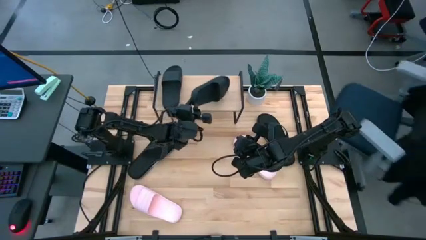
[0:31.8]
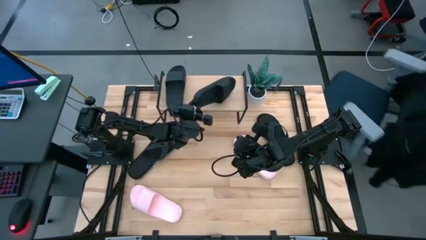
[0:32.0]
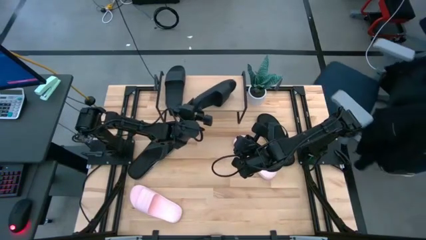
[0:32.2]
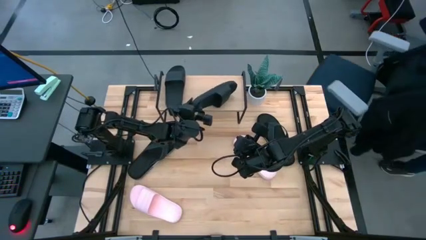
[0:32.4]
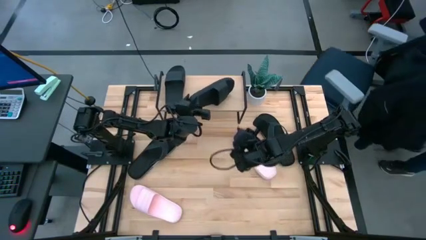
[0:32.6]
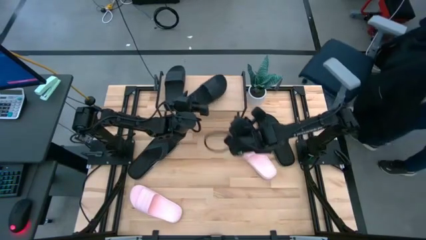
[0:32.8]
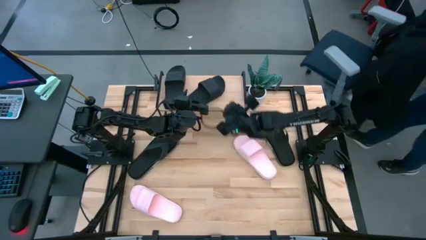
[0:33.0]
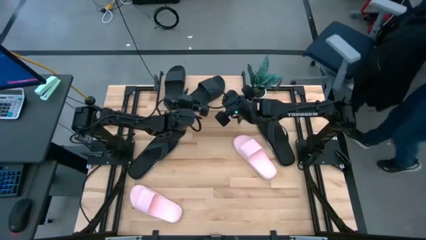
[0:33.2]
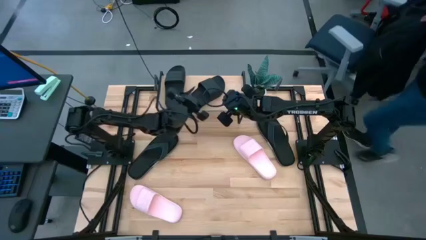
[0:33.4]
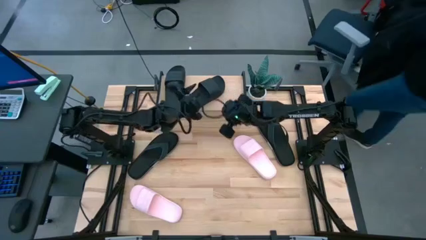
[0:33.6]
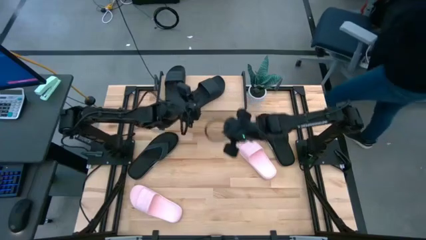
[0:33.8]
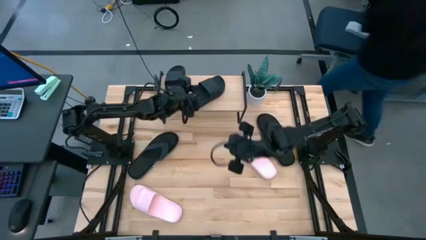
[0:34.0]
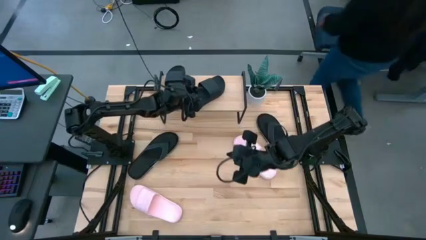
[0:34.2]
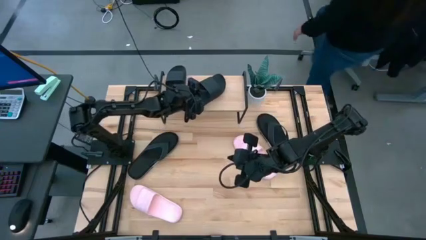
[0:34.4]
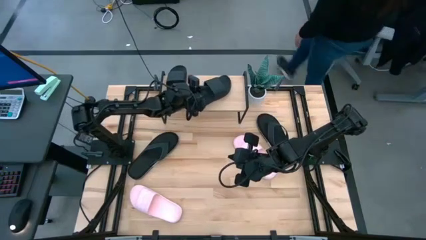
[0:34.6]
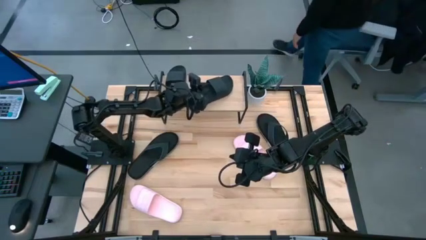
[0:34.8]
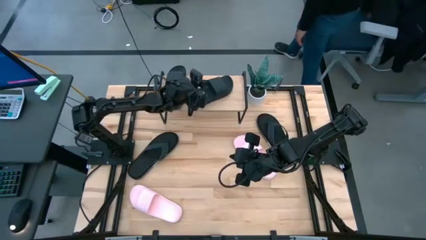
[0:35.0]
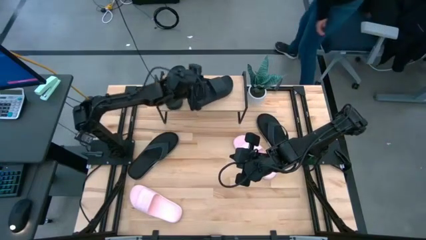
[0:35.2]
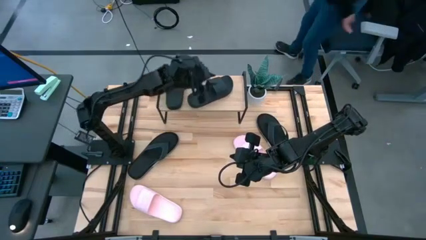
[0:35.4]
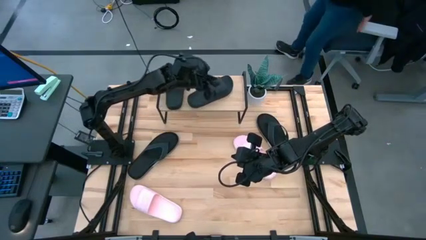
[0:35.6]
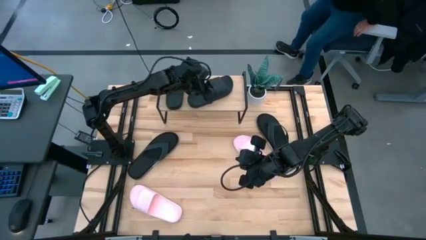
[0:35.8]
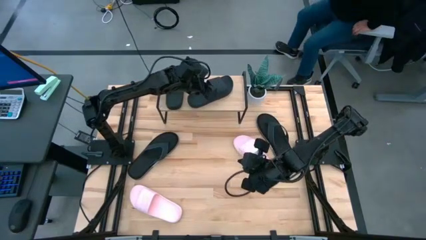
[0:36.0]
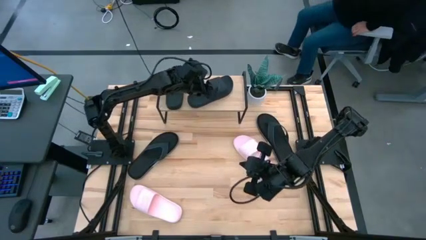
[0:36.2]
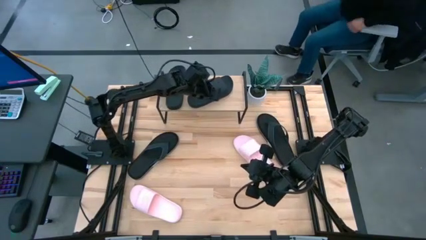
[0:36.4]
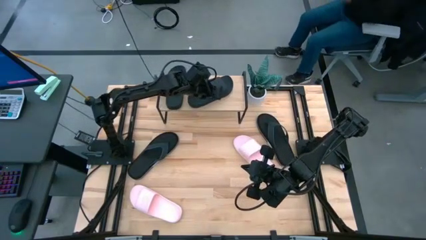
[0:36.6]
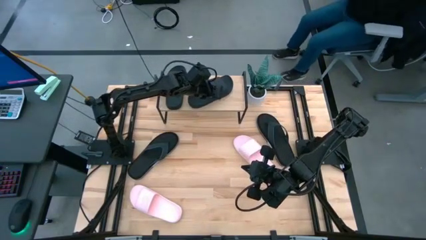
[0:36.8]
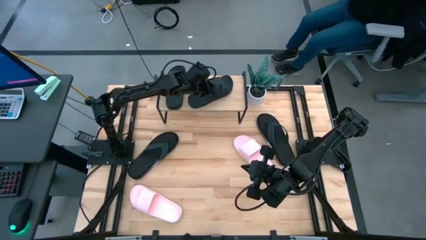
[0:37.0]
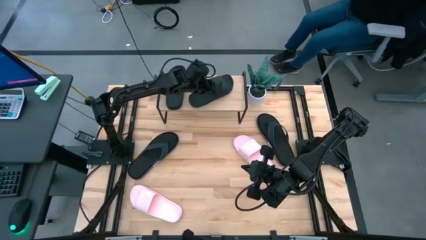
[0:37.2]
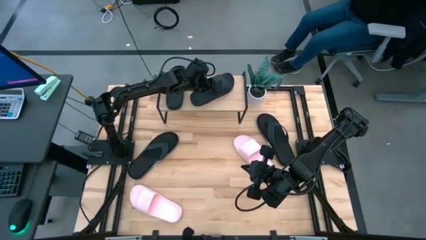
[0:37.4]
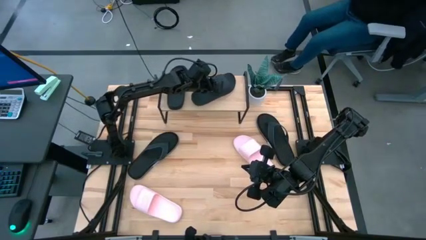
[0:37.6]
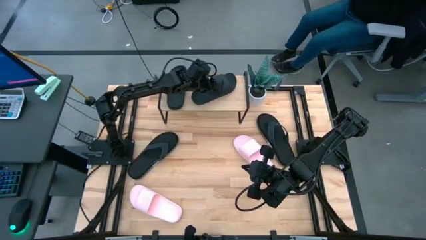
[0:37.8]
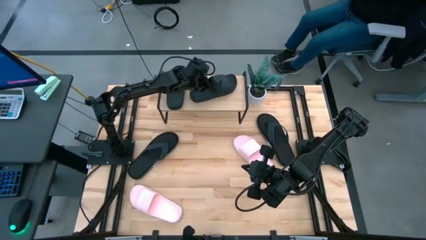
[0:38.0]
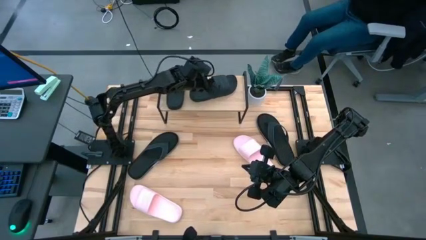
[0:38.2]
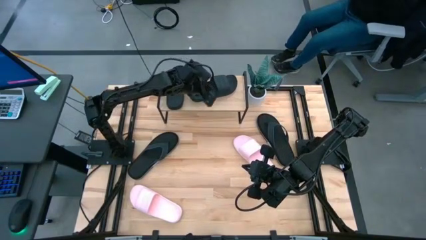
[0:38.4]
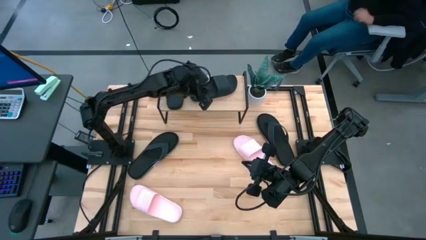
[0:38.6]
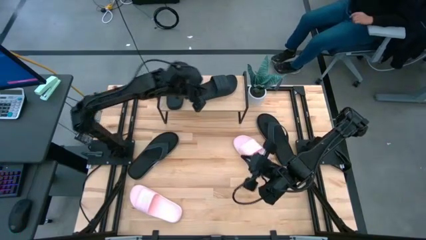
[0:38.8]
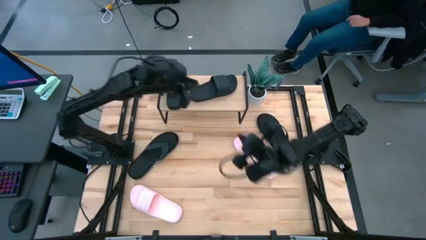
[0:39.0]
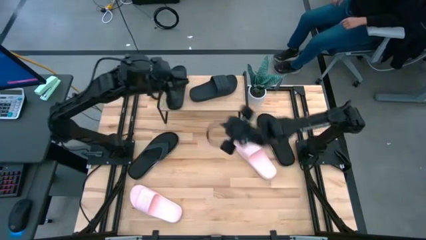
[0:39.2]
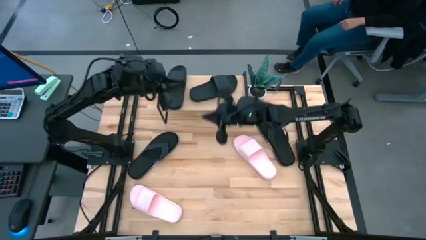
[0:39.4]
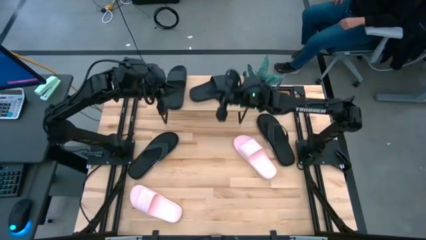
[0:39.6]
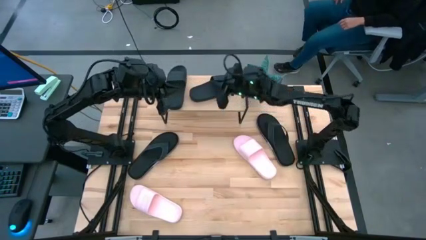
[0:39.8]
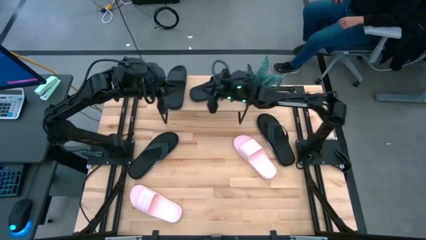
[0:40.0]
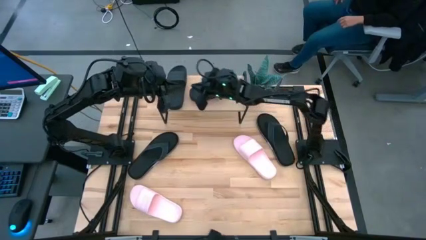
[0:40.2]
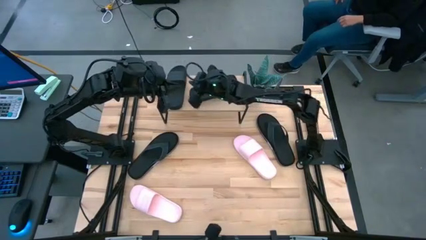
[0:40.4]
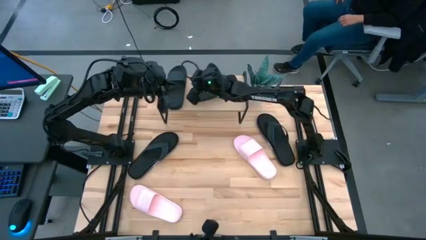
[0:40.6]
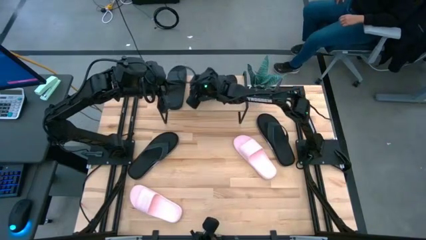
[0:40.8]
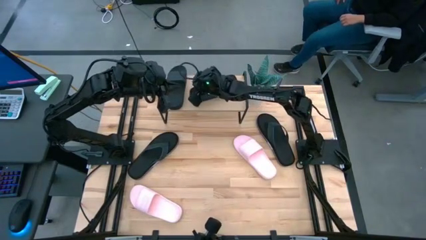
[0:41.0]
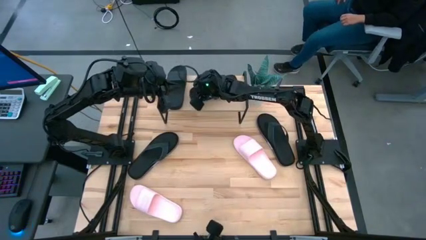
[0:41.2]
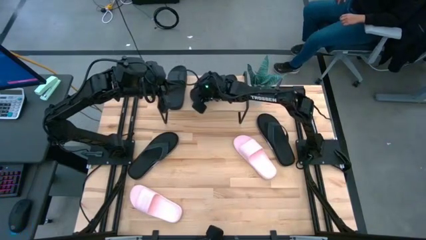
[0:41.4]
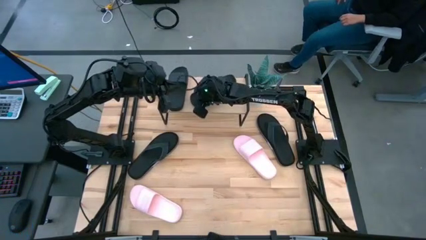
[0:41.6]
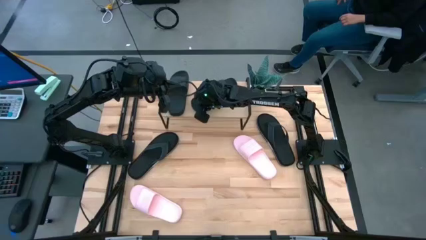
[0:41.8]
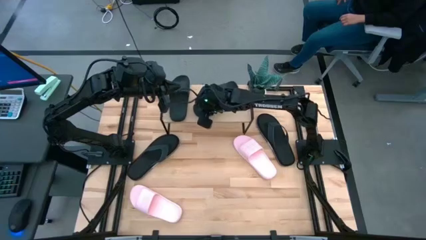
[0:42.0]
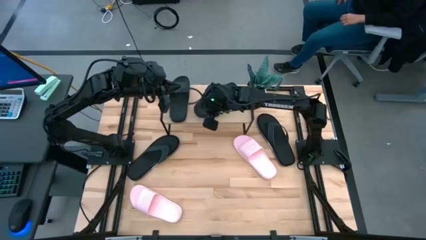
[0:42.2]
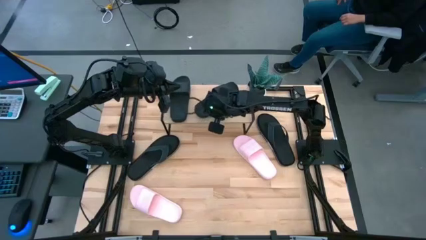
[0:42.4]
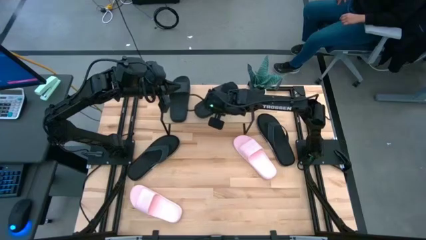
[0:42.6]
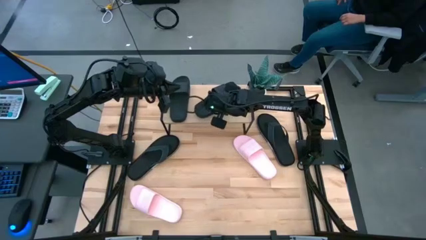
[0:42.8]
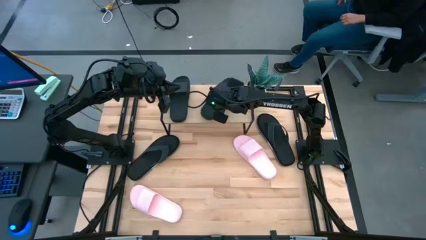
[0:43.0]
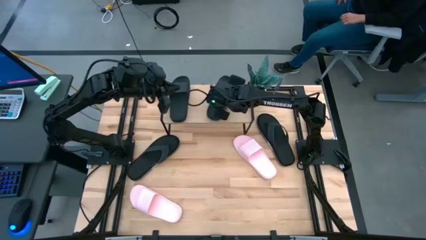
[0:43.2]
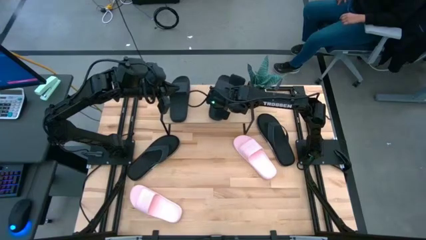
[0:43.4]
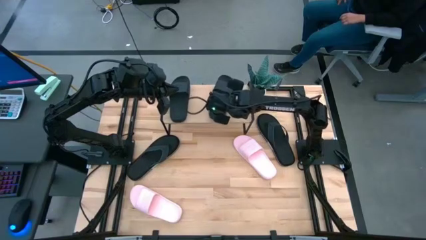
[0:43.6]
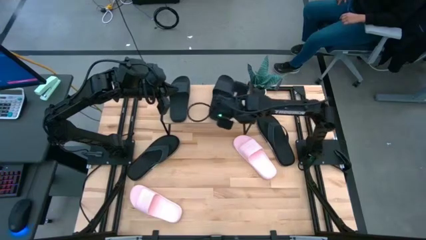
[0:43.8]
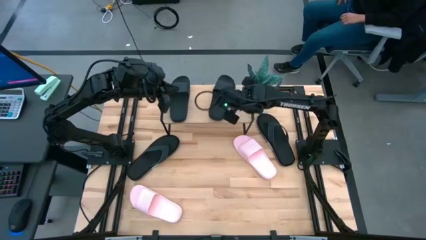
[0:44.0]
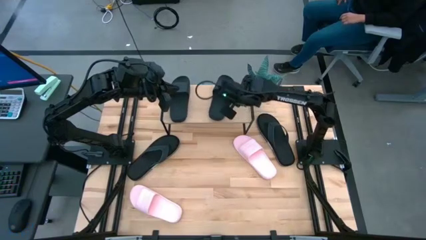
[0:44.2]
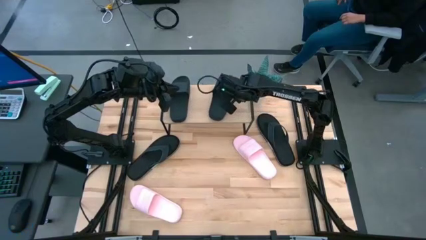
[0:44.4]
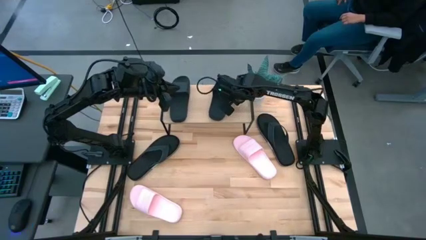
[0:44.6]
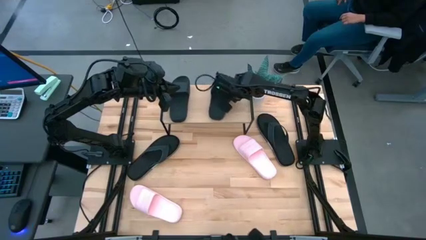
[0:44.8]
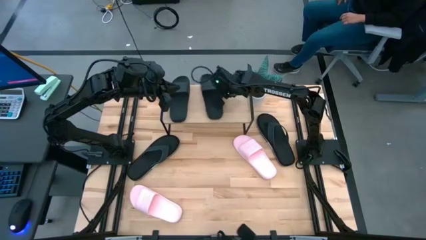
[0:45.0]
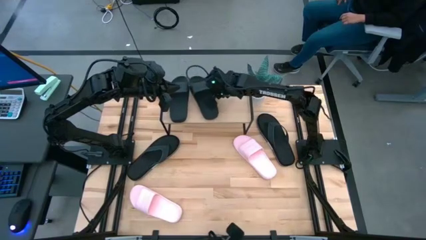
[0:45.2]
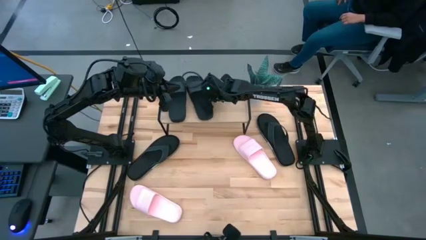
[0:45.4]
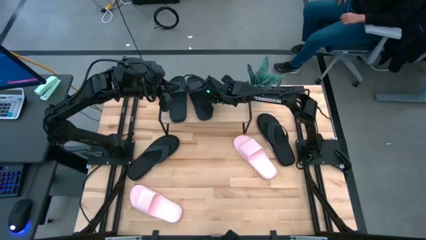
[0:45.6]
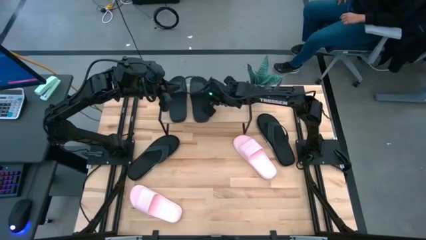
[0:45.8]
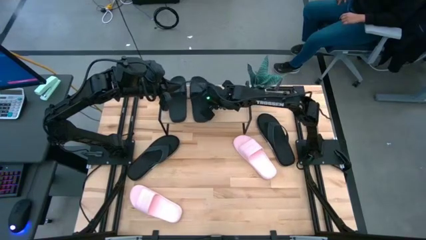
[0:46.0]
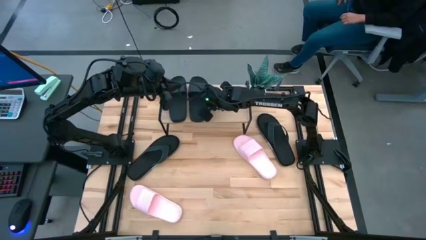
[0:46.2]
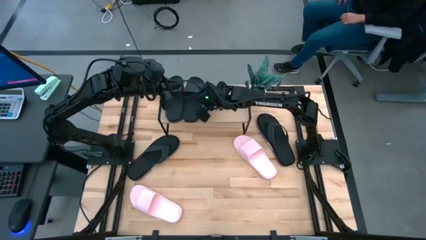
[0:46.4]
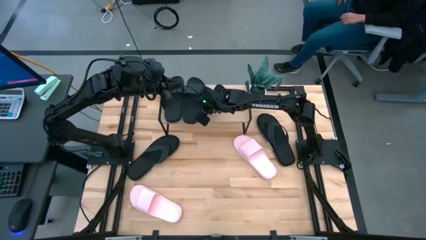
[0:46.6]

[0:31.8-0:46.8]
Task: Pick and place slides into the shelf
Put the black slipper on the shelf

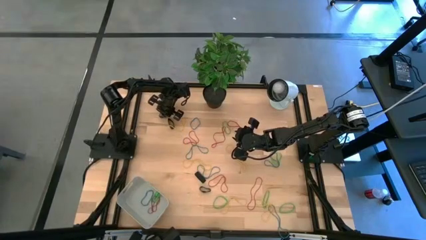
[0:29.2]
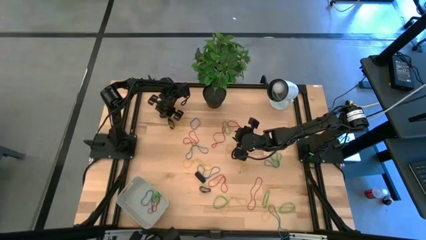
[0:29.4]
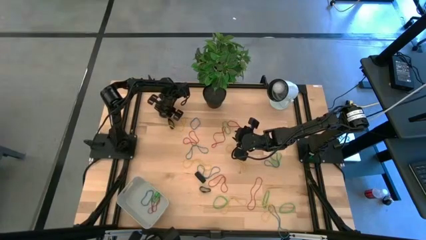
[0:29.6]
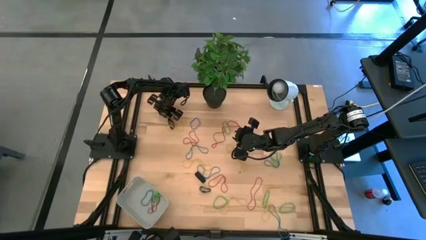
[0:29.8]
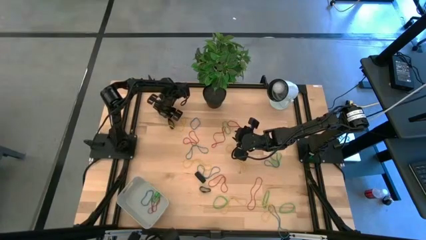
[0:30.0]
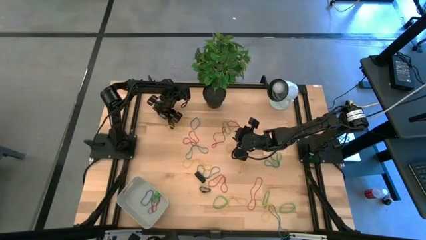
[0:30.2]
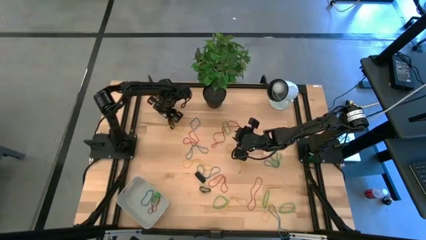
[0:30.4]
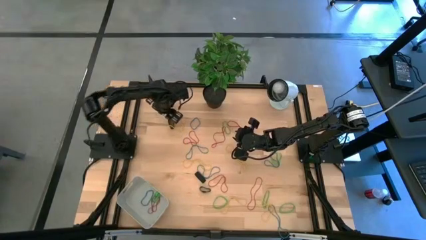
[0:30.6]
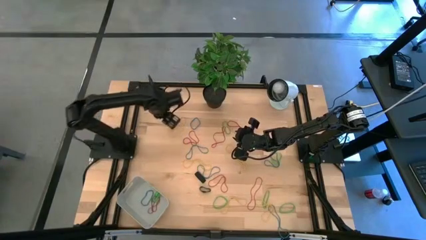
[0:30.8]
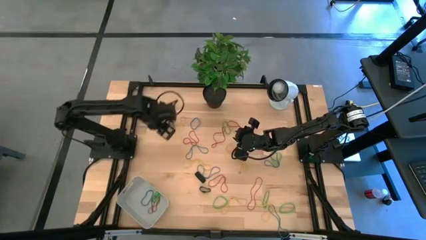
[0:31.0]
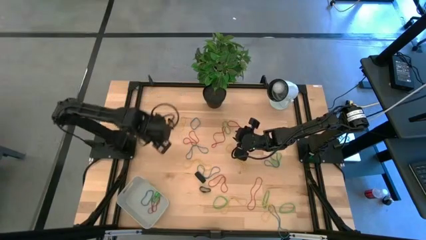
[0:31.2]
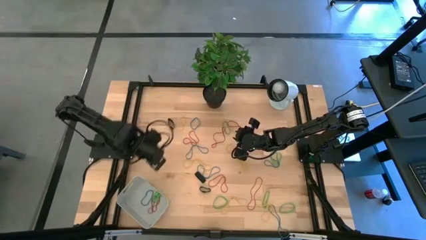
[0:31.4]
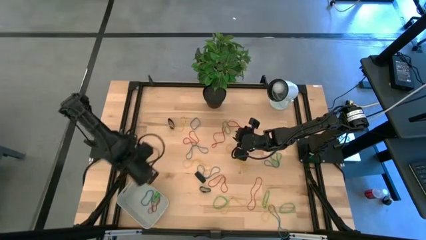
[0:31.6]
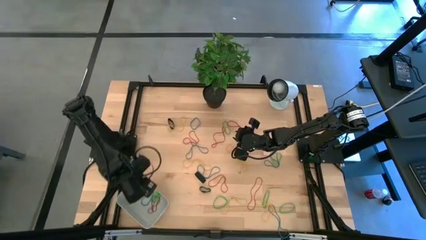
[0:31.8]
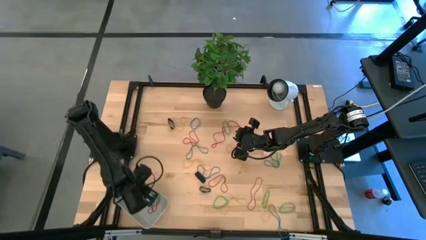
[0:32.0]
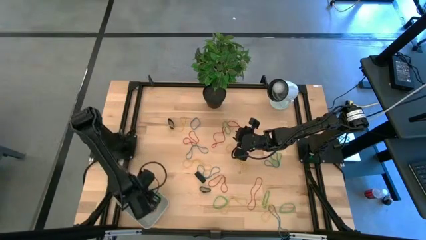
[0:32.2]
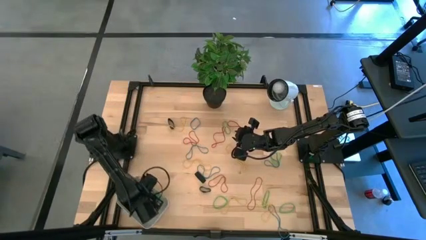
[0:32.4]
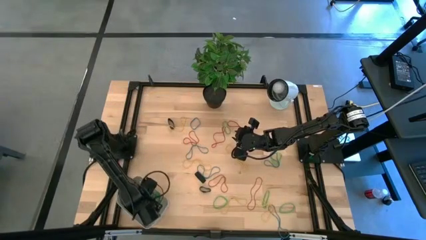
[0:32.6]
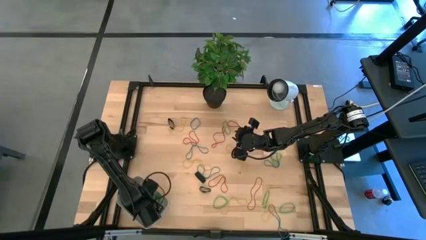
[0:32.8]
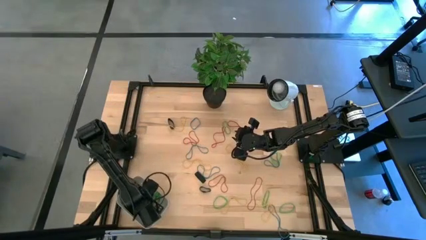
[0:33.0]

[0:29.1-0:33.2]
Task: Pick and place rubber bands into bin
Put the black rubber band into the gray bin
